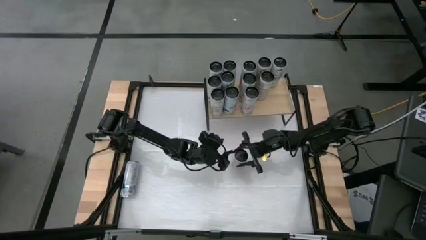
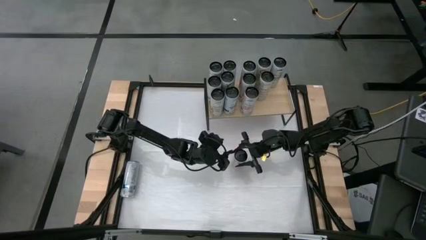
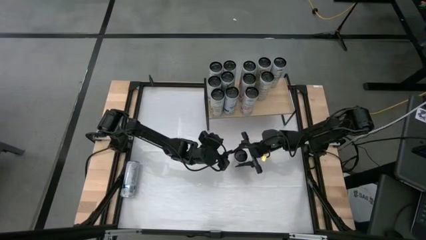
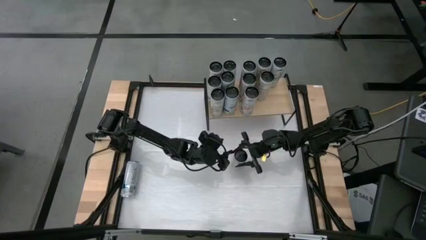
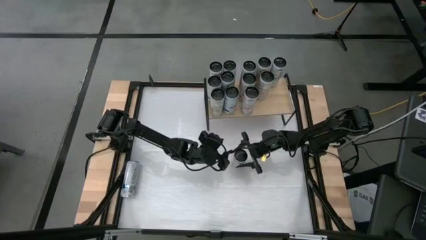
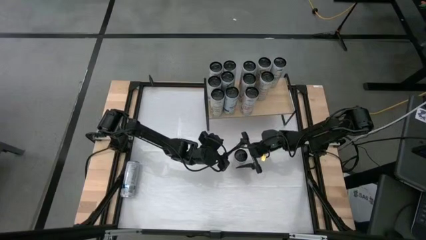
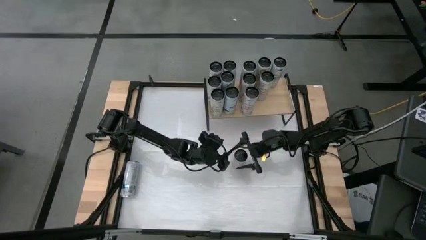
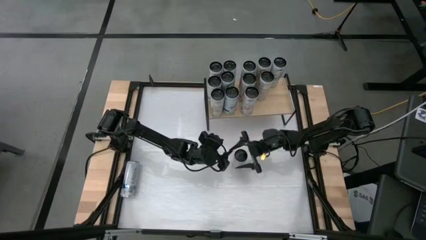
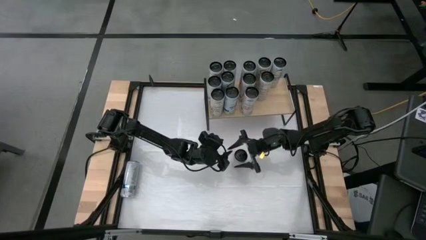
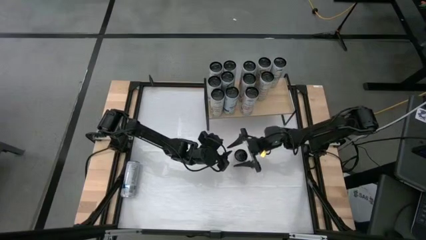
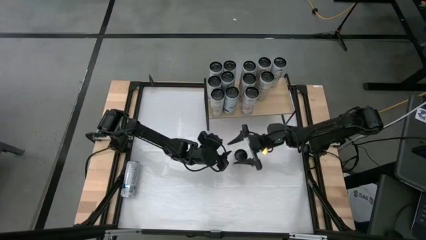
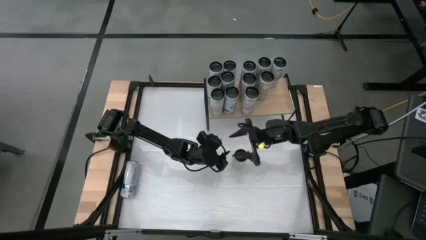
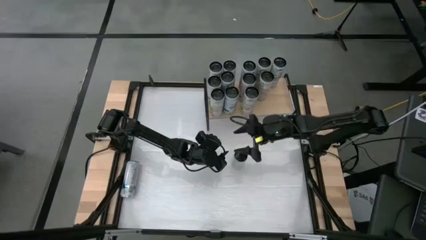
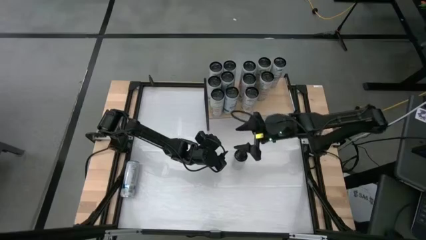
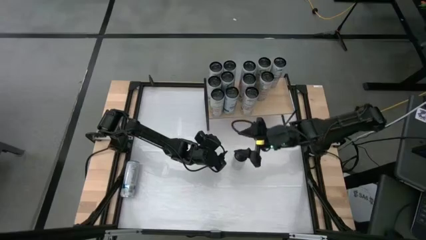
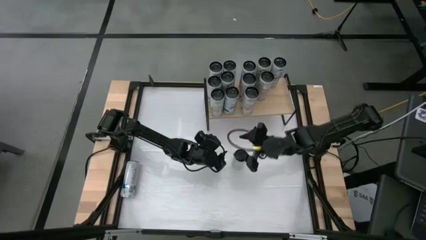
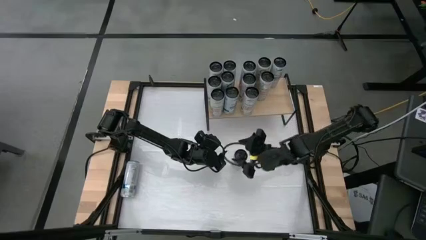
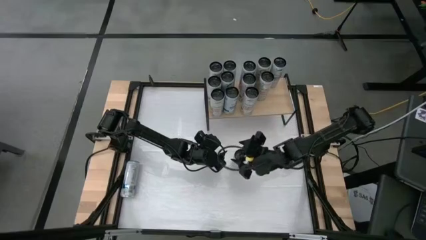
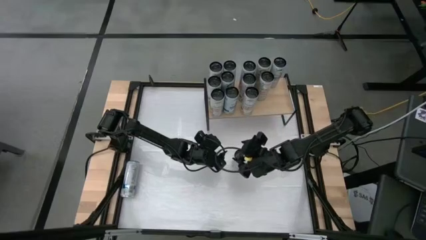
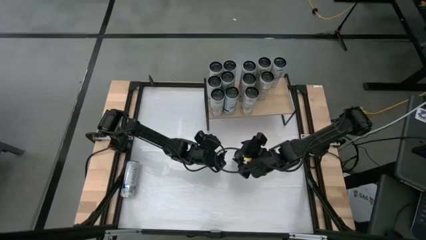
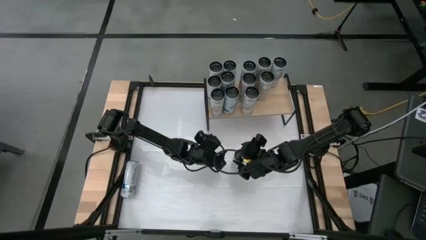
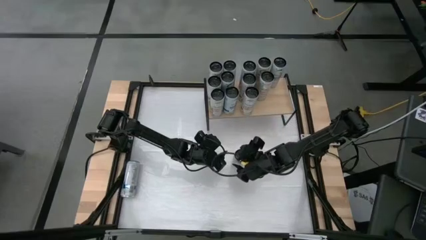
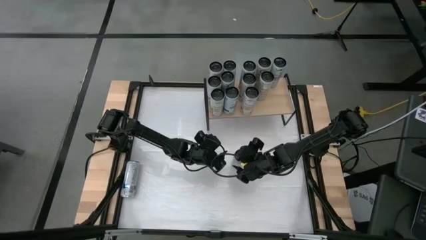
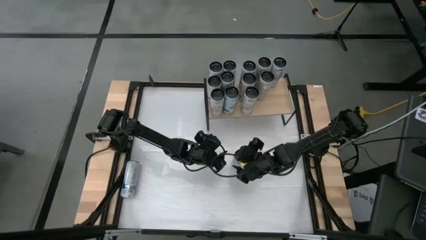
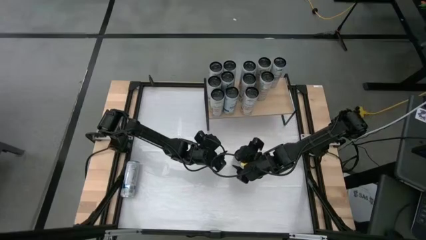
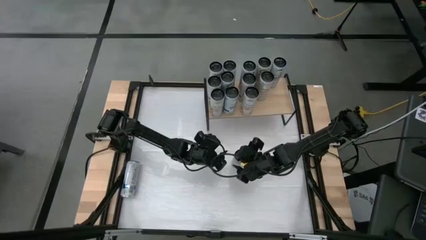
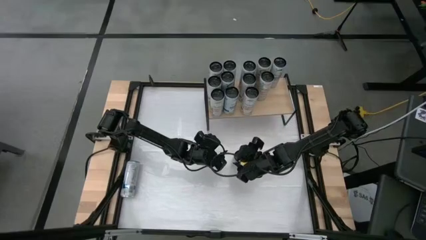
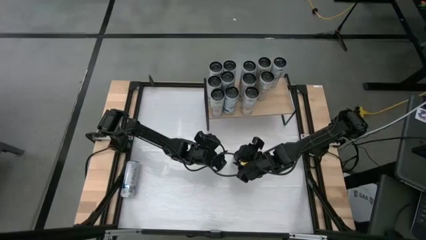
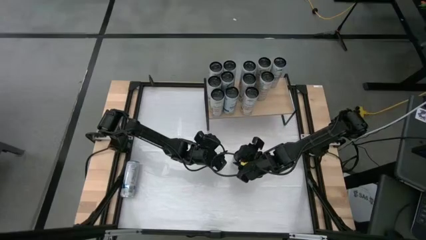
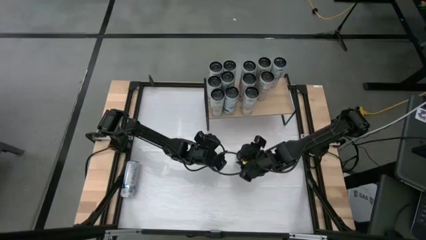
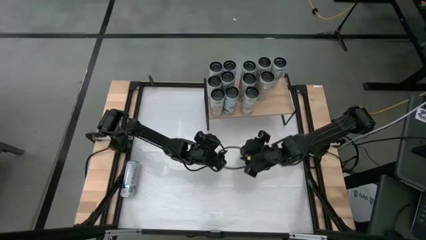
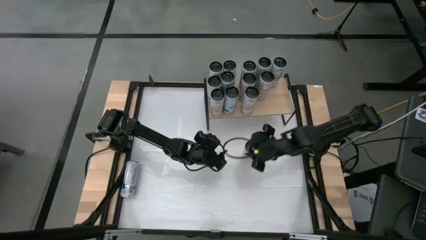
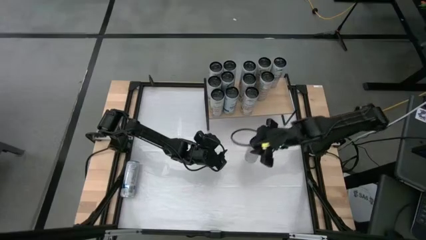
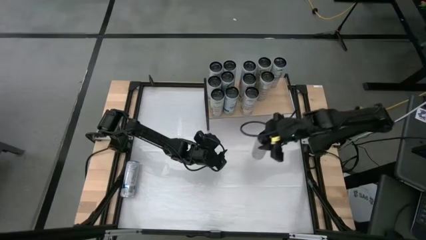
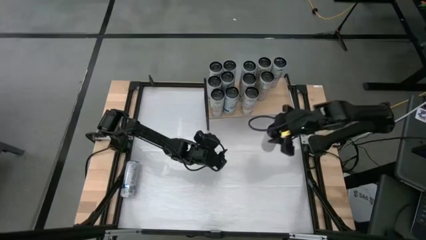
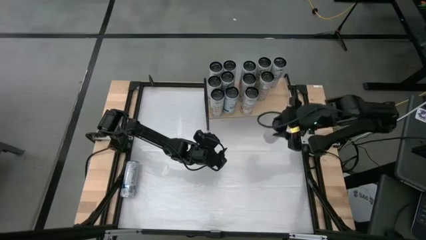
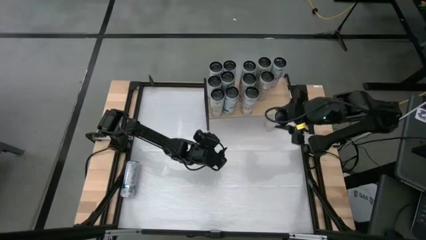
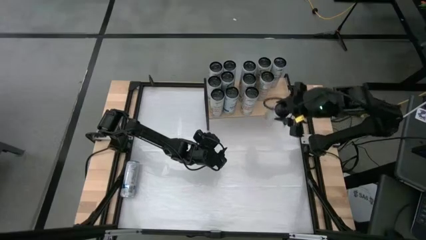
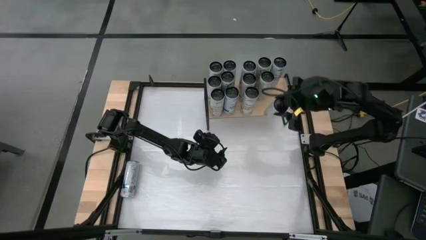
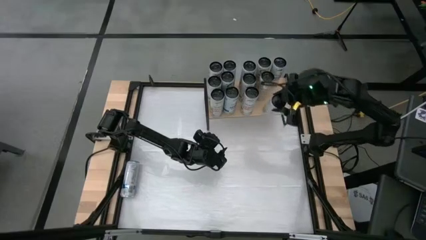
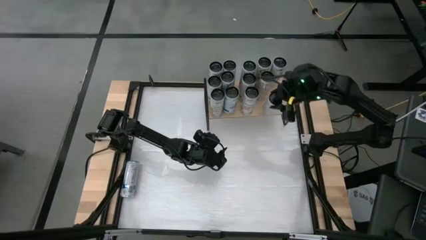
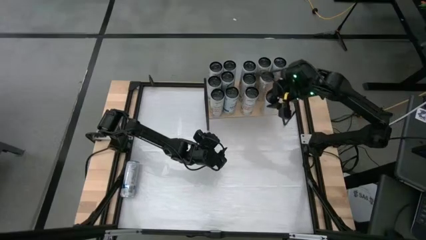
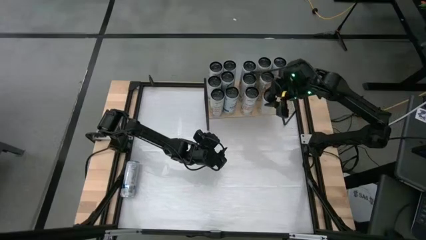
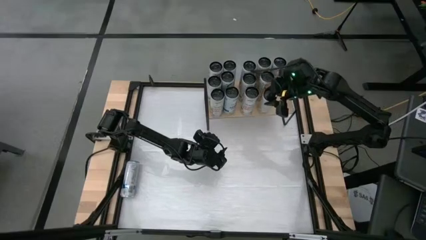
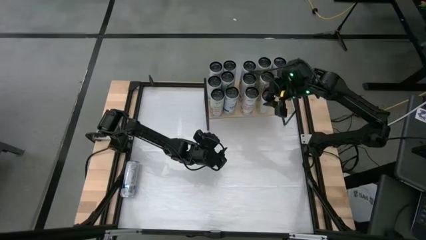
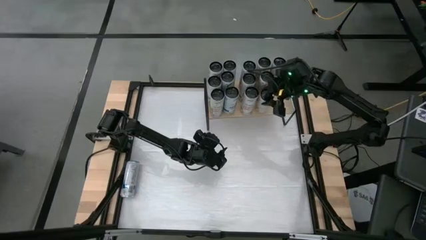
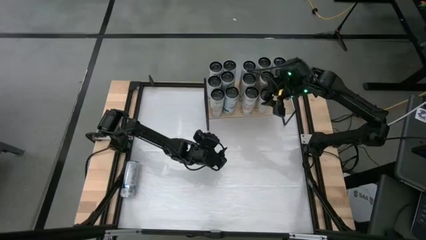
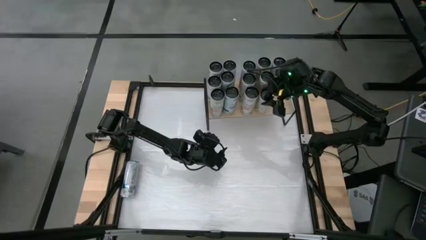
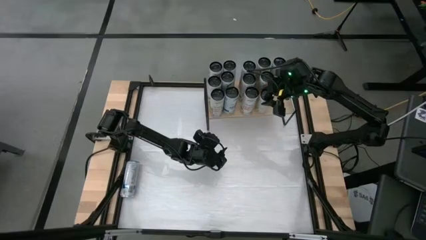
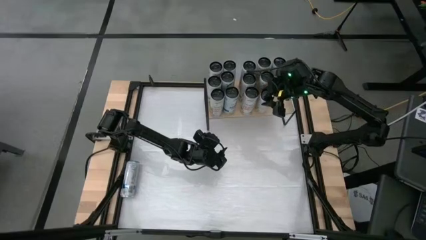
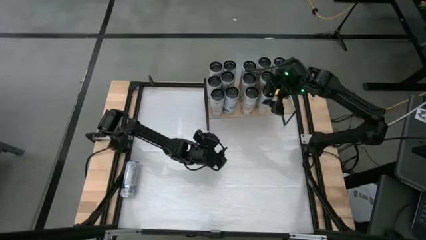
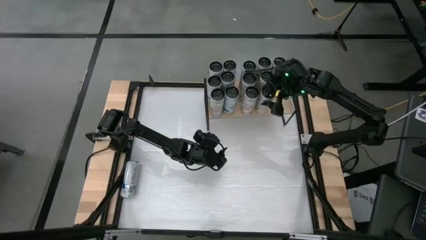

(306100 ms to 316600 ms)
Task: Place canned beverage on shelf
Put the orange soda can on the shelf aligned with the orange soda cans

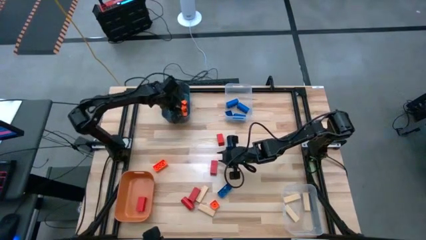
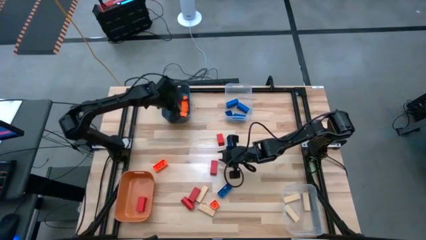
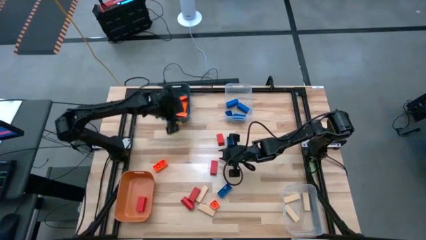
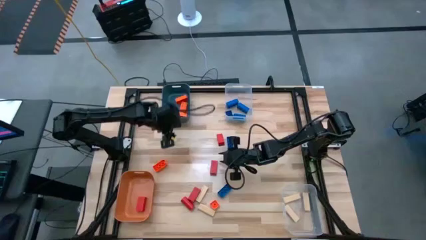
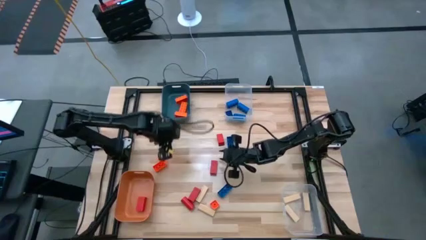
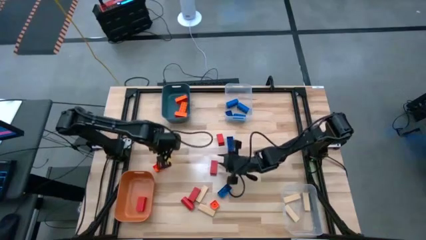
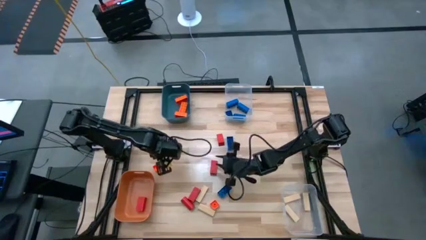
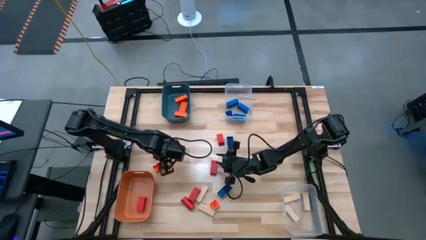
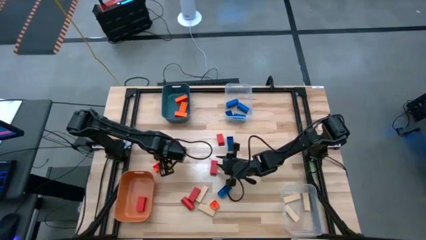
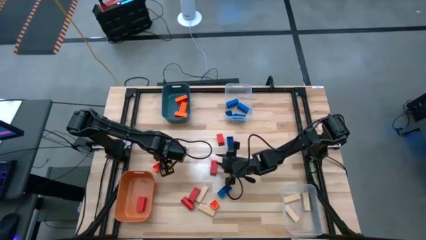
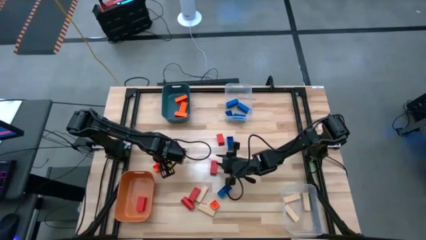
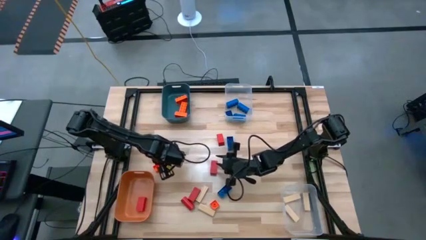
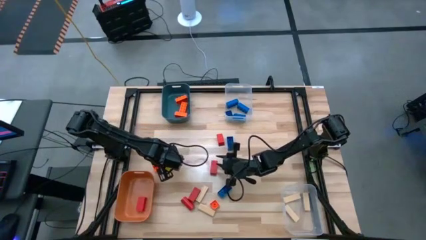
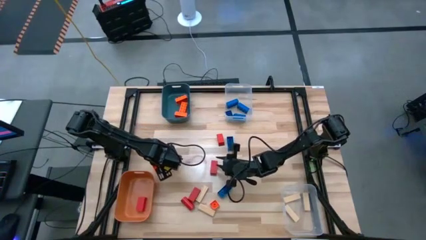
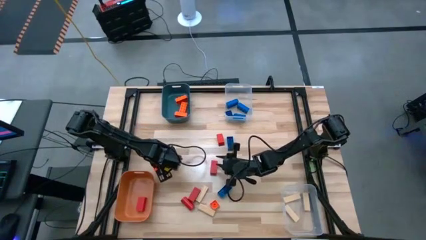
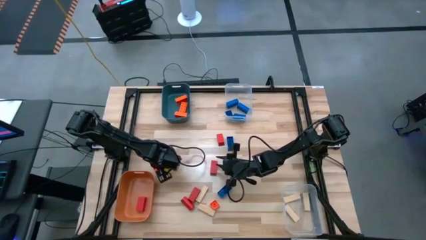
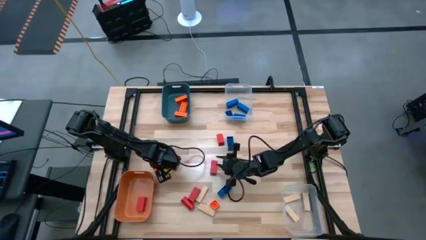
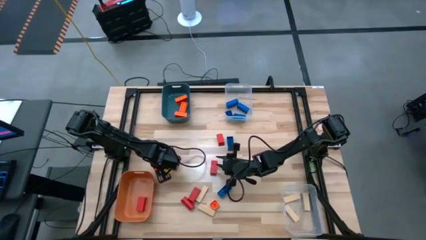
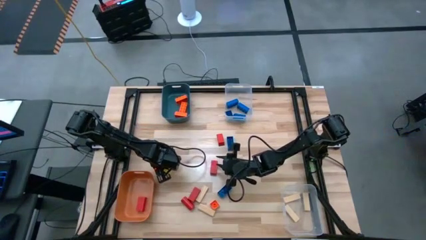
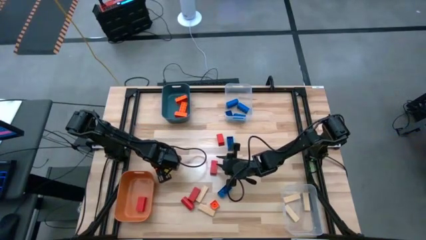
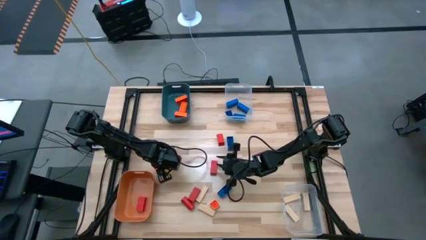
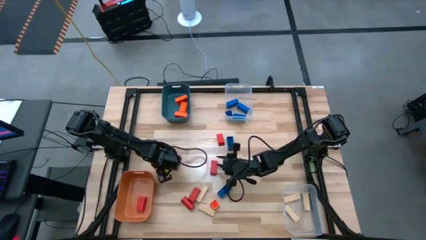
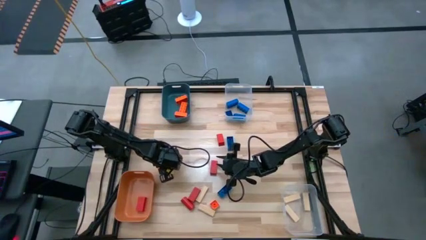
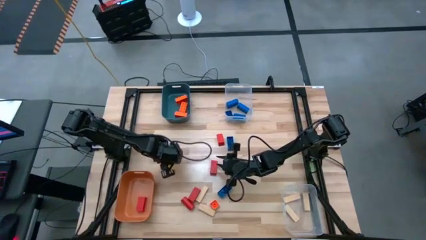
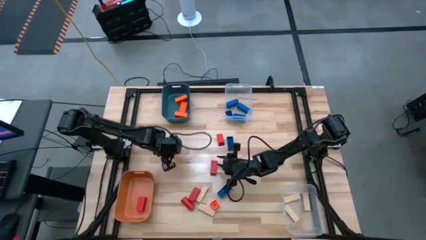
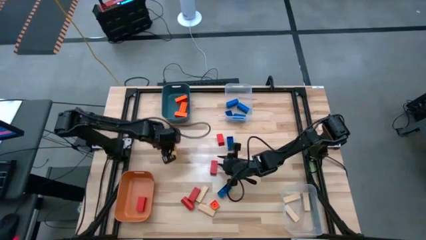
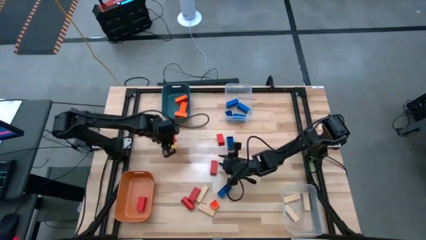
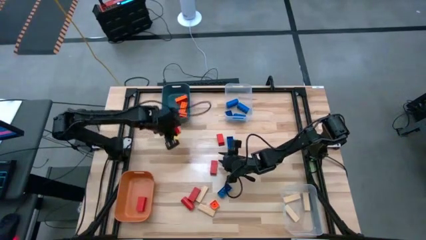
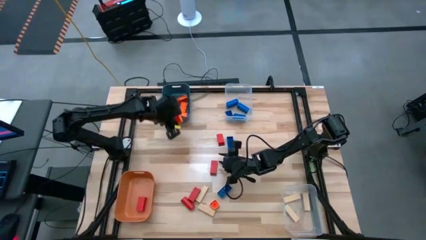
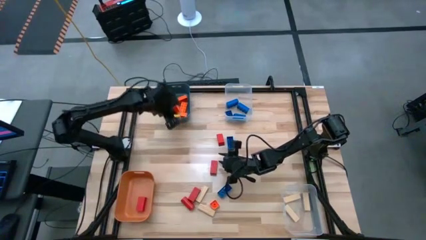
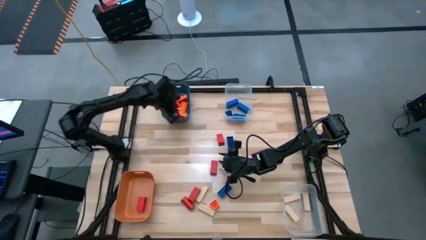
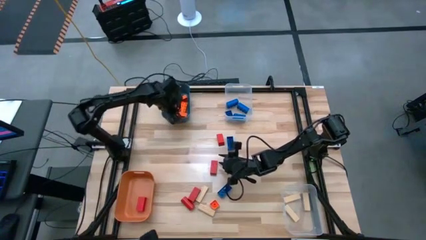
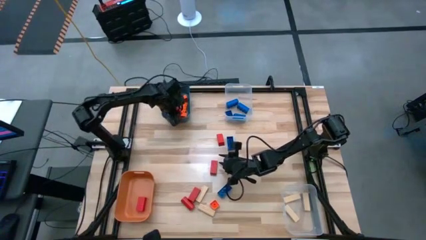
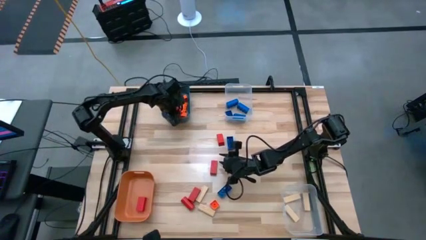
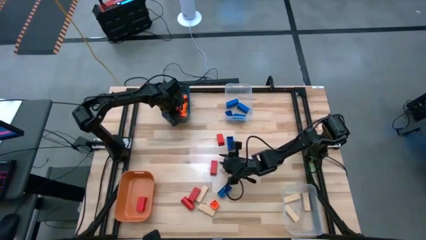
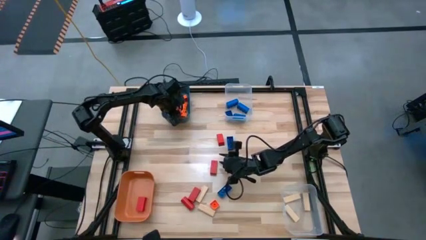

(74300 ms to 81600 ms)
Task: Sort blocks
Put the orange game piece into the blue bin
